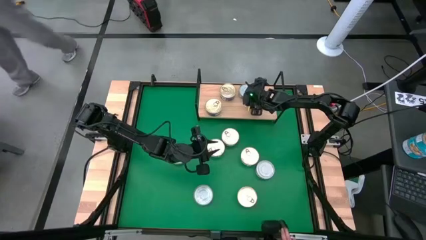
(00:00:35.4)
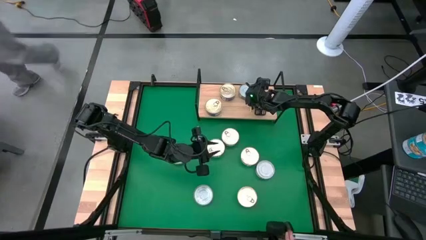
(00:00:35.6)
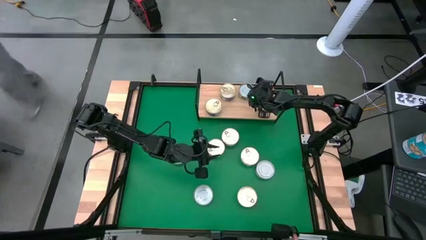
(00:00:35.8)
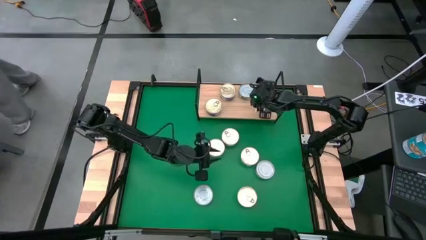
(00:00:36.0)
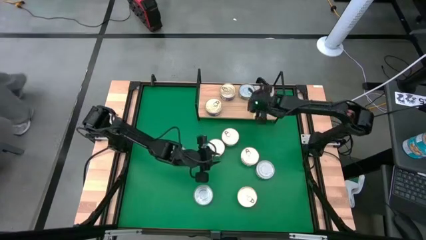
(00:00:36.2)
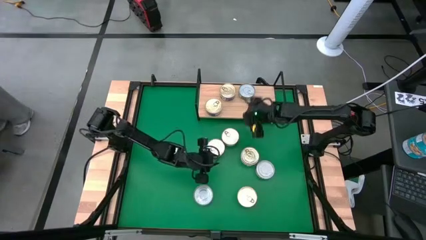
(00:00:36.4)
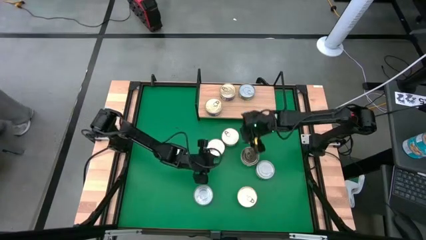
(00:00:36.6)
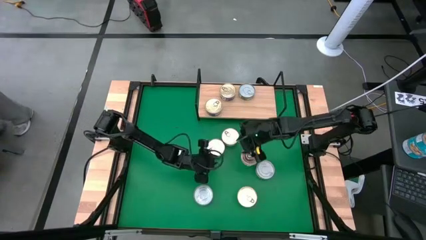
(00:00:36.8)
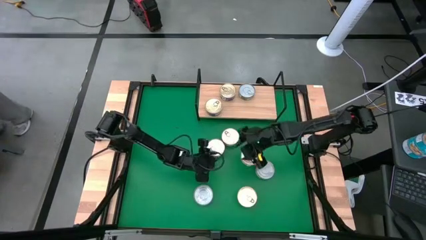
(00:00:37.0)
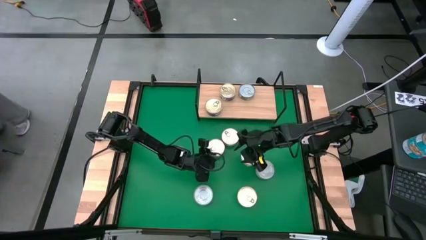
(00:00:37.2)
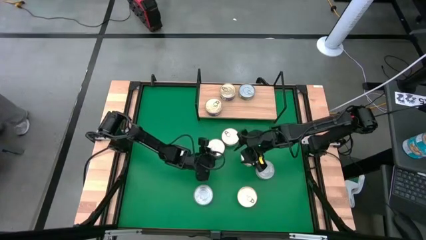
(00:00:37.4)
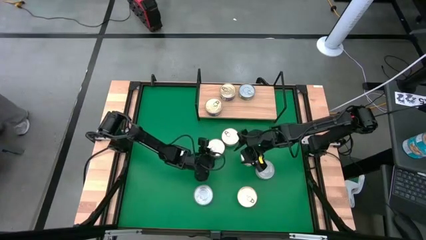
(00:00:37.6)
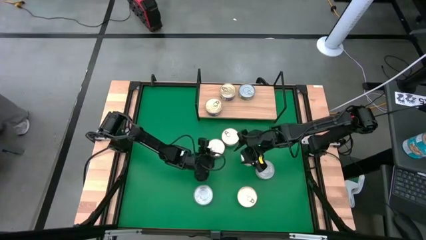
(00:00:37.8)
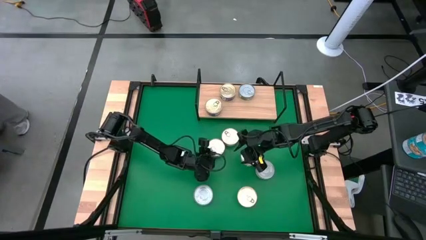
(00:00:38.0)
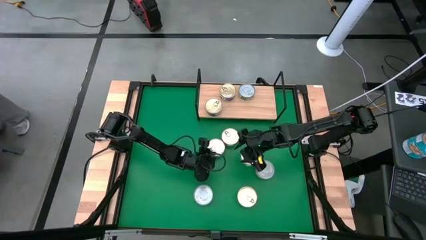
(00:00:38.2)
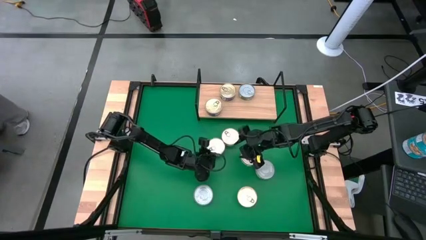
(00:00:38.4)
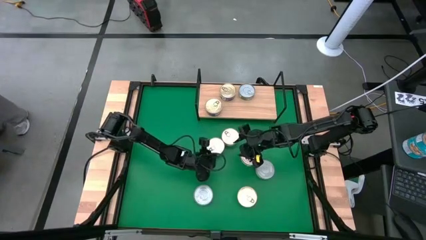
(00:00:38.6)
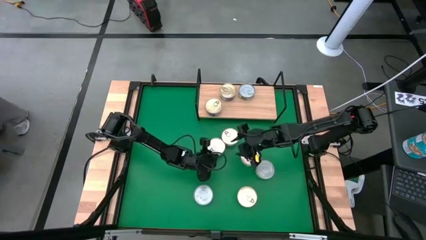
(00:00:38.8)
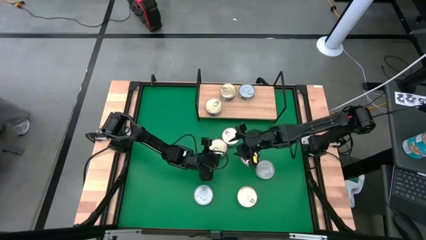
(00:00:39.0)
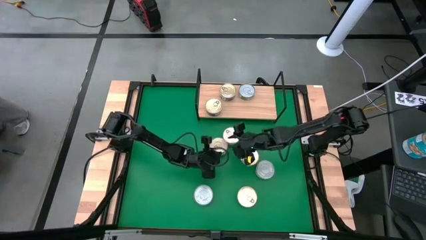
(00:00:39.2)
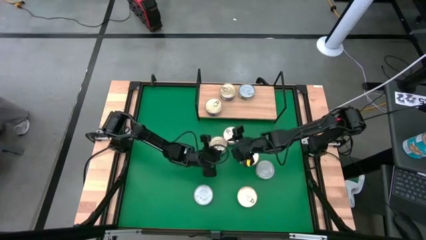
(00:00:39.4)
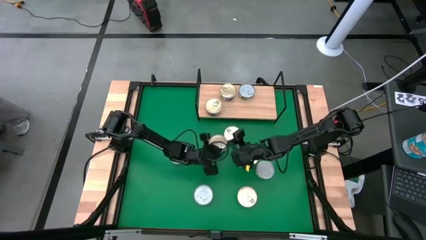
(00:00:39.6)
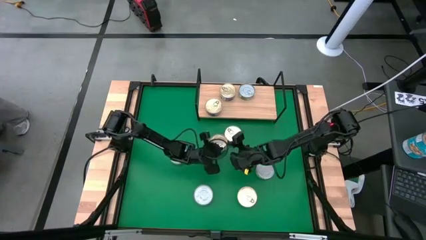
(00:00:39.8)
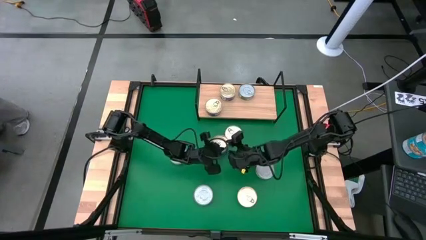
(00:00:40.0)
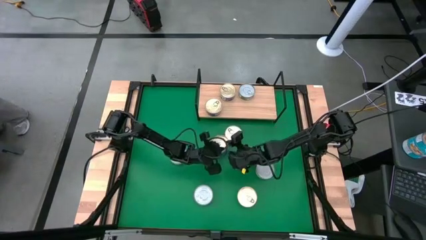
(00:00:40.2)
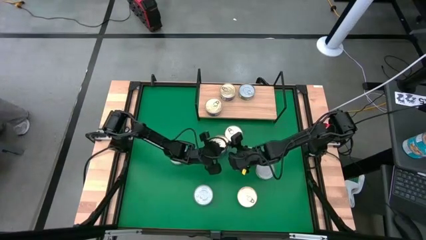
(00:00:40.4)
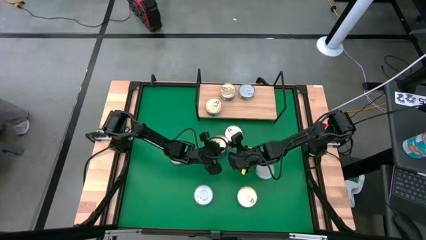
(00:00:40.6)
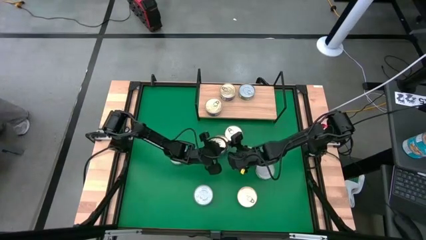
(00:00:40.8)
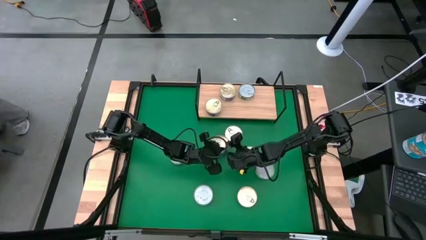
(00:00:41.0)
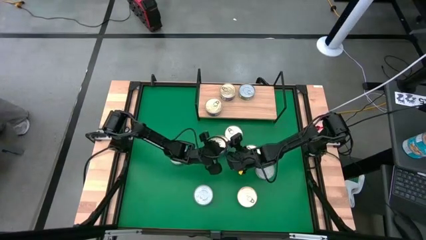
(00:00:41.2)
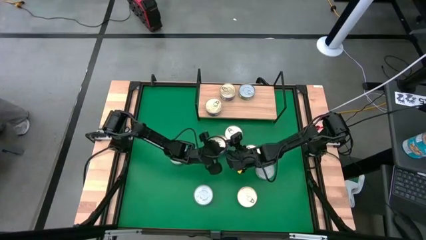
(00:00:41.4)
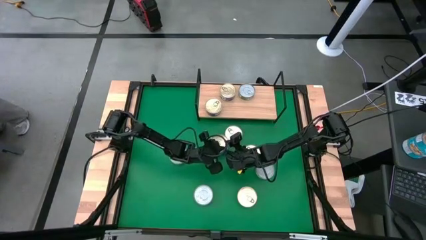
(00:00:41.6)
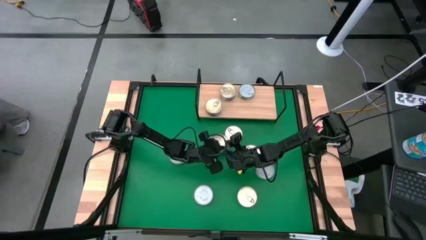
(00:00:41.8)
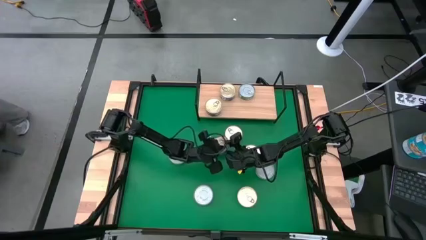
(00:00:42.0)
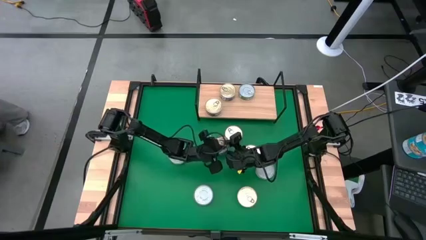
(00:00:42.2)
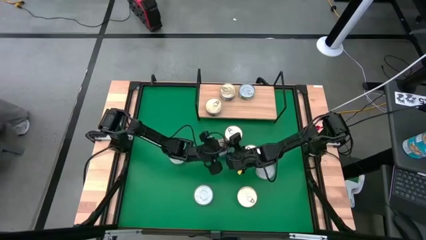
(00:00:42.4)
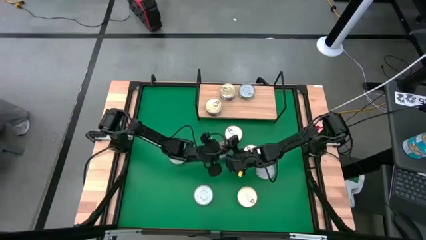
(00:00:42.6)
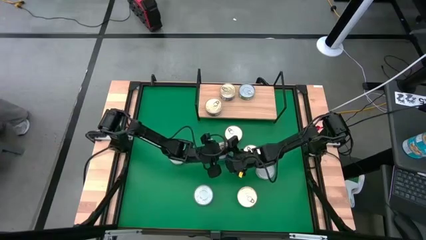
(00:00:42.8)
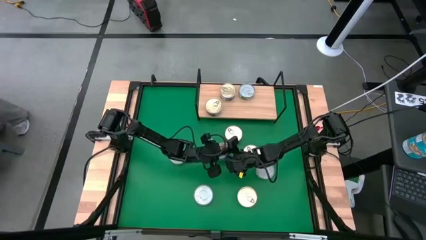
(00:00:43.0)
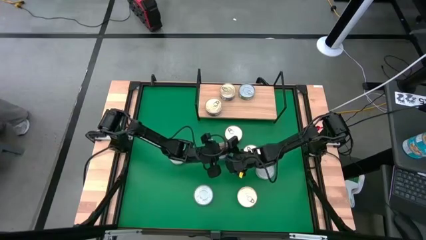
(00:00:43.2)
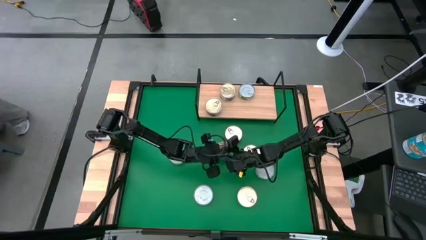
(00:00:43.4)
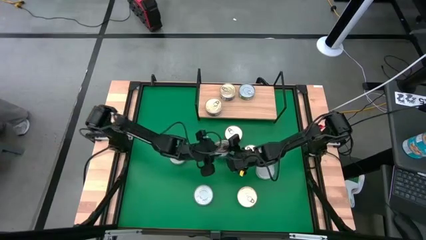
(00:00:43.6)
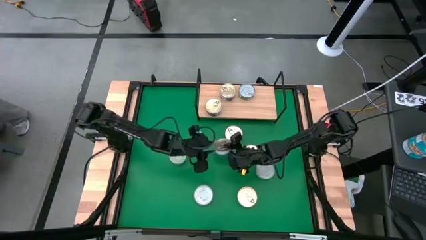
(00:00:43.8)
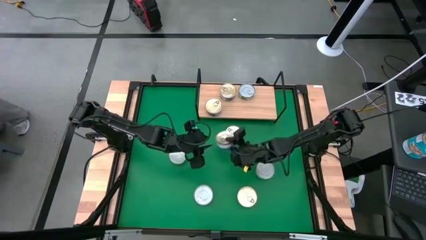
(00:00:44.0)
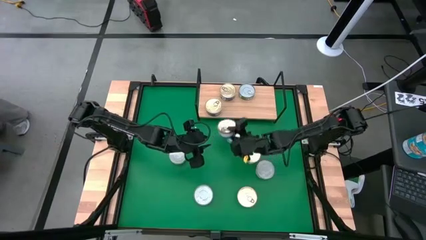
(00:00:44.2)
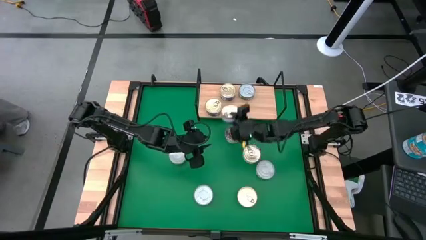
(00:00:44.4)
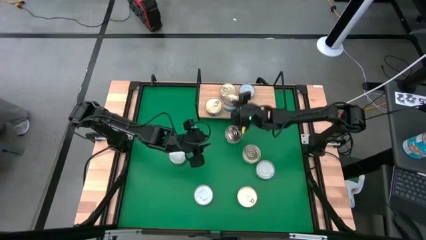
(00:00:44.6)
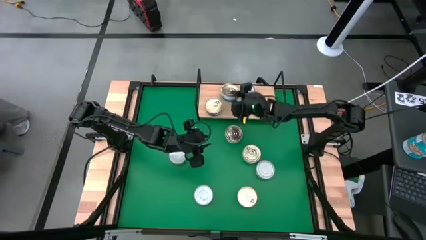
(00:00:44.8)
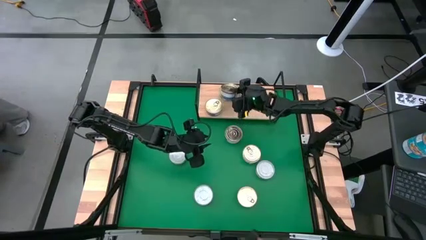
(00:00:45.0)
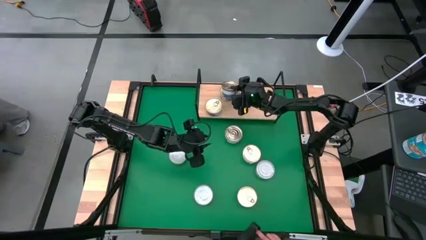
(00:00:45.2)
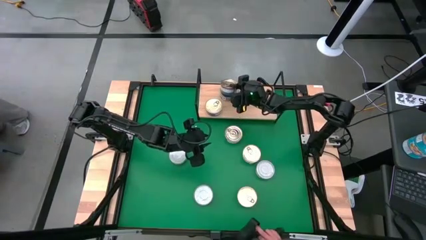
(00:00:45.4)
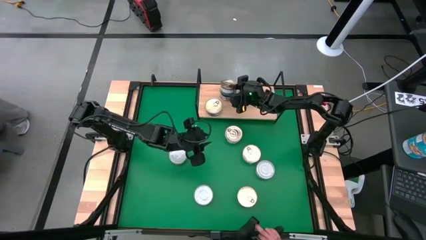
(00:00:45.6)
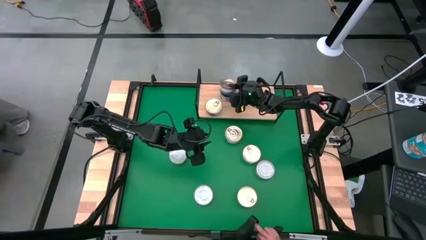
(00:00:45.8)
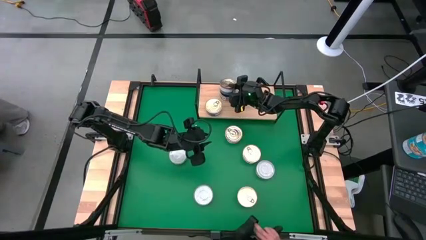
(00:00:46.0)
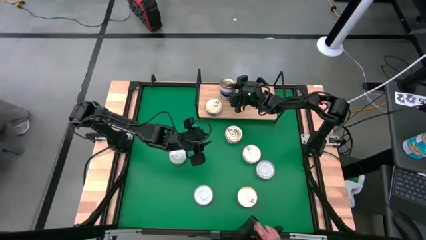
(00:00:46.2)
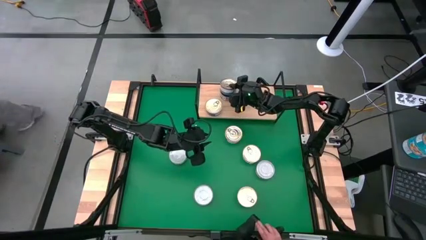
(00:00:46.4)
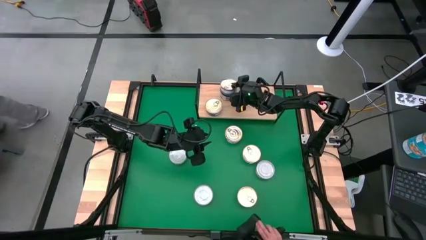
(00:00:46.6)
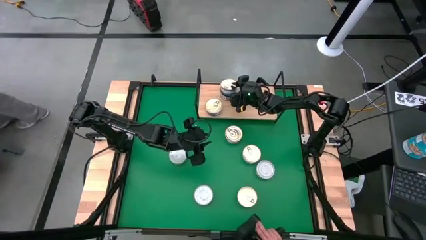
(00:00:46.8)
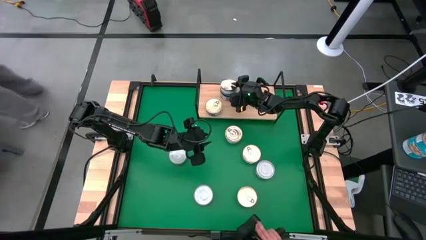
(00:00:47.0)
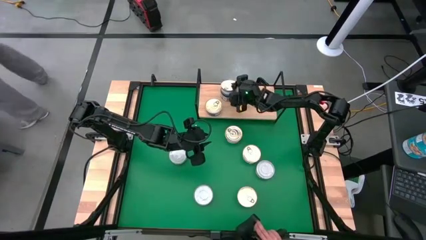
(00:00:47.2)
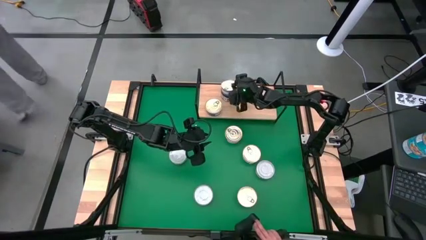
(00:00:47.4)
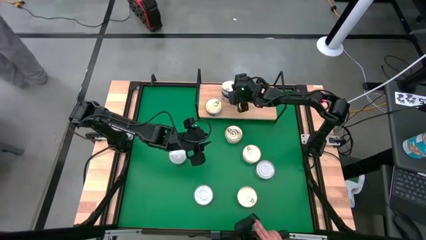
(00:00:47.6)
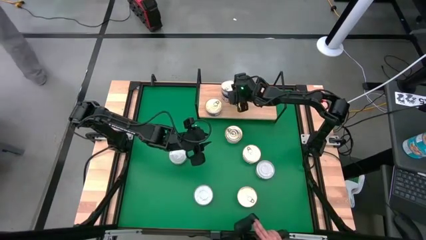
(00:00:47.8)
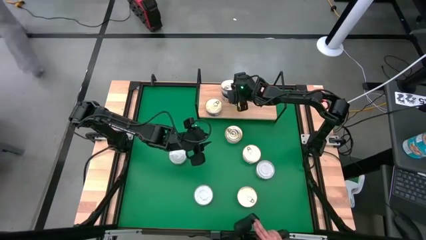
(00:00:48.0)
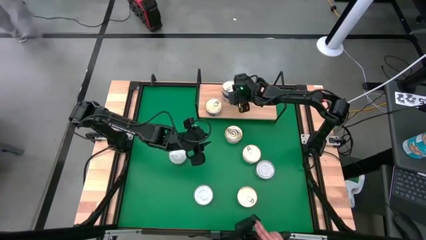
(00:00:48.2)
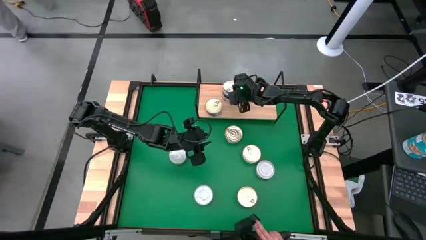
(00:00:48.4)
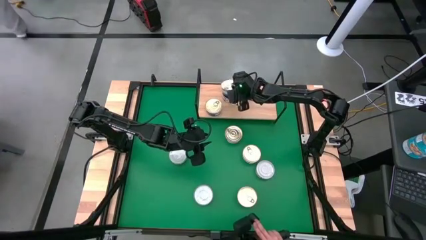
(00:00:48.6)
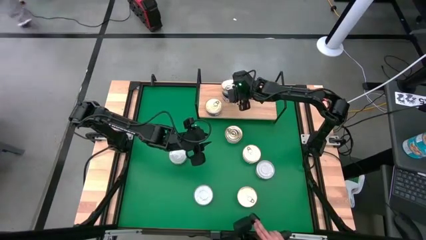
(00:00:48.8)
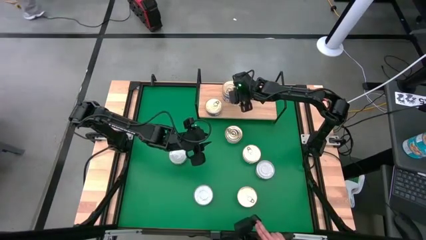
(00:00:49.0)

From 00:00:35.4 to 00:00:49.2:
Task: Stack canned seafood by type on shelf
Stack the blue tuna can on top of the blue can on the shelf
